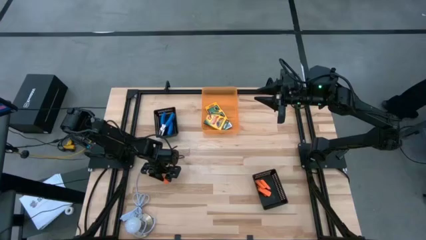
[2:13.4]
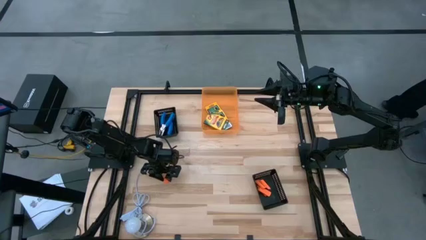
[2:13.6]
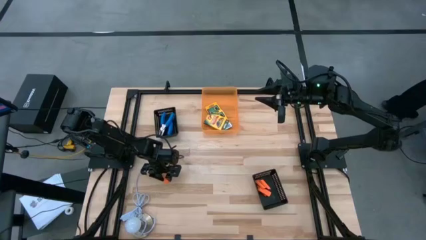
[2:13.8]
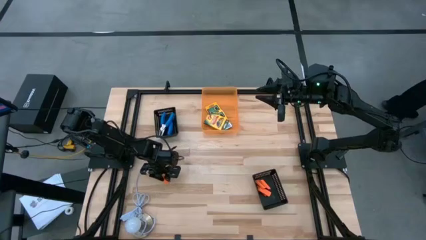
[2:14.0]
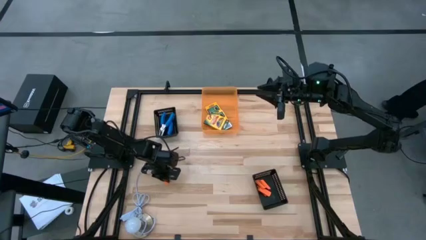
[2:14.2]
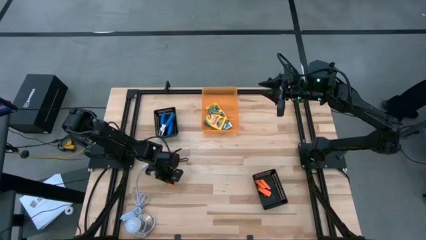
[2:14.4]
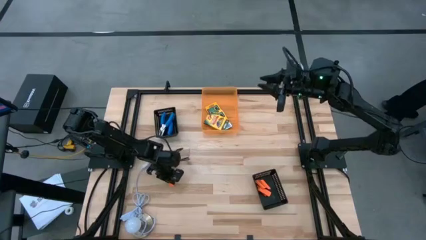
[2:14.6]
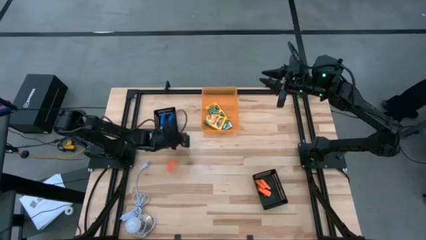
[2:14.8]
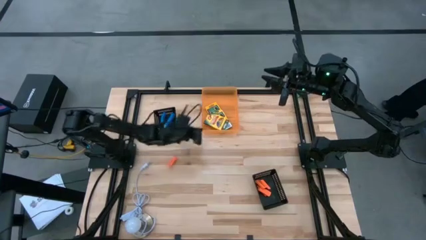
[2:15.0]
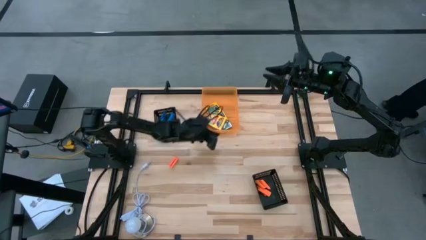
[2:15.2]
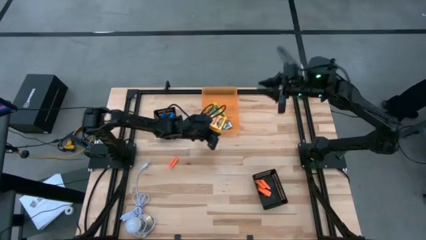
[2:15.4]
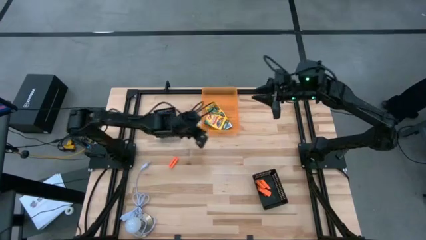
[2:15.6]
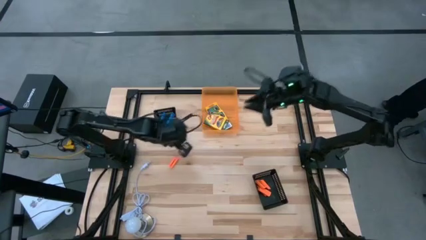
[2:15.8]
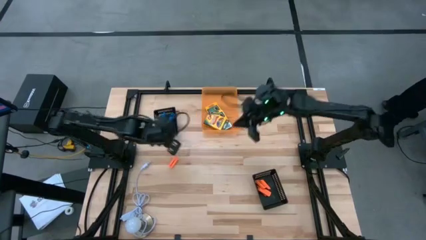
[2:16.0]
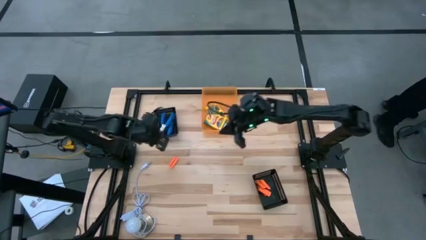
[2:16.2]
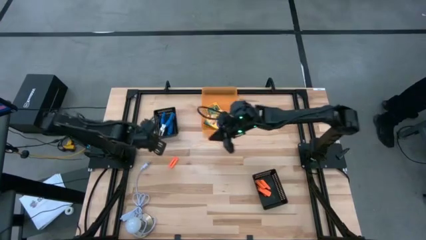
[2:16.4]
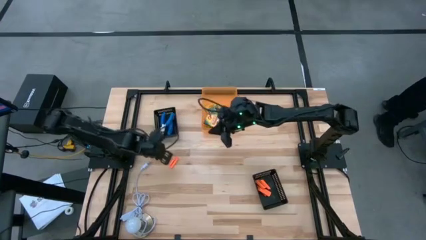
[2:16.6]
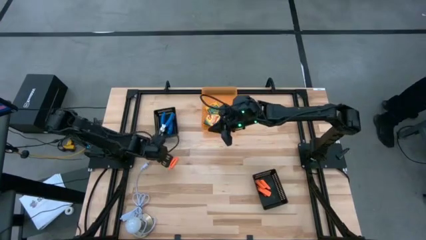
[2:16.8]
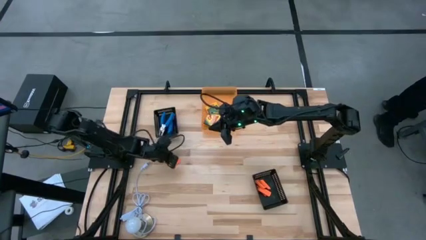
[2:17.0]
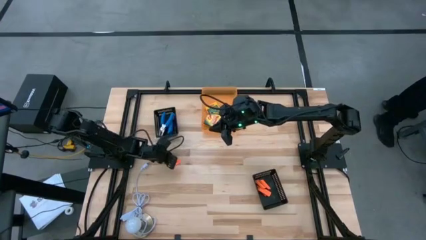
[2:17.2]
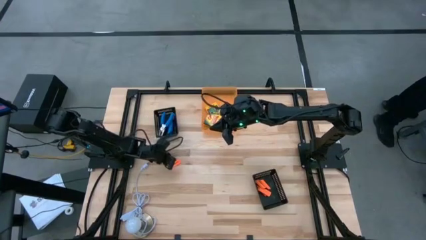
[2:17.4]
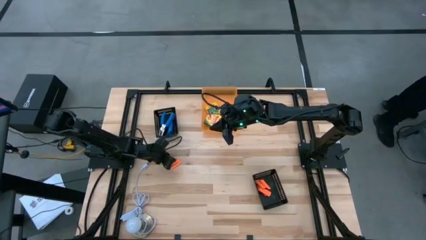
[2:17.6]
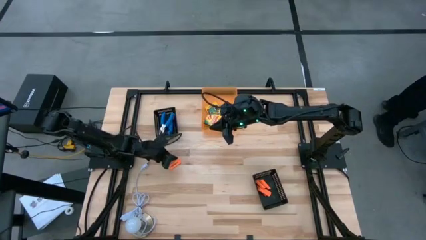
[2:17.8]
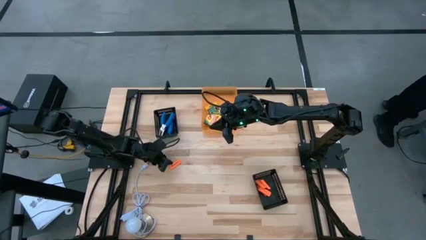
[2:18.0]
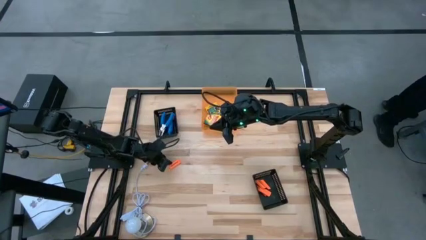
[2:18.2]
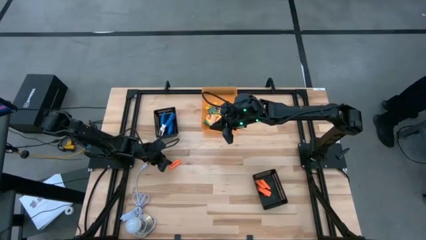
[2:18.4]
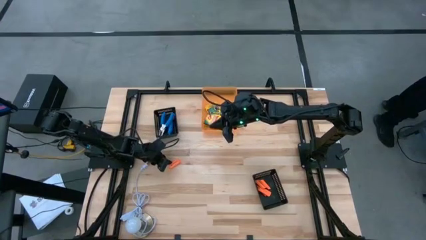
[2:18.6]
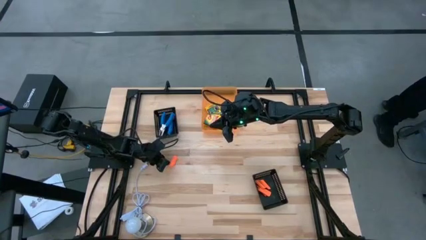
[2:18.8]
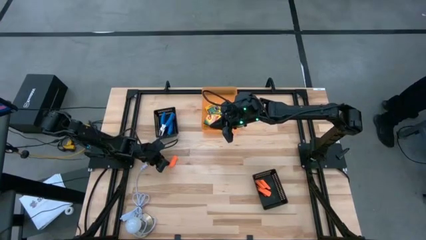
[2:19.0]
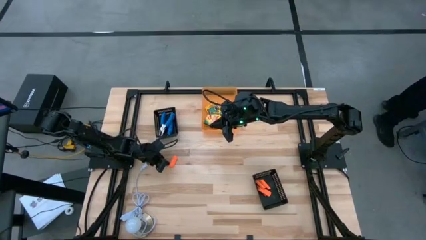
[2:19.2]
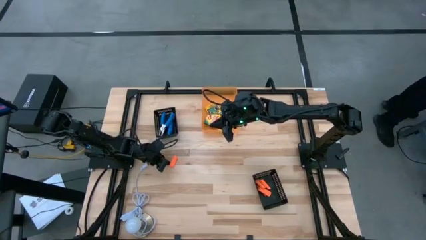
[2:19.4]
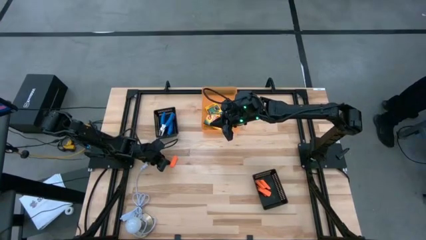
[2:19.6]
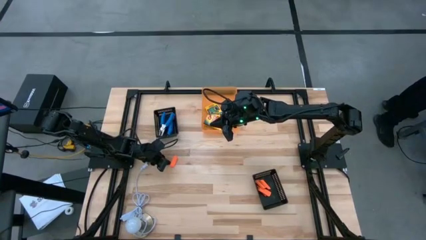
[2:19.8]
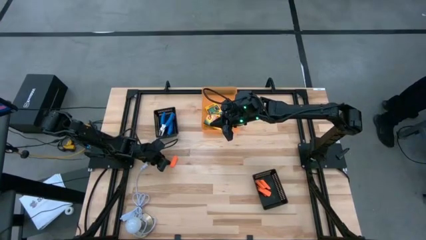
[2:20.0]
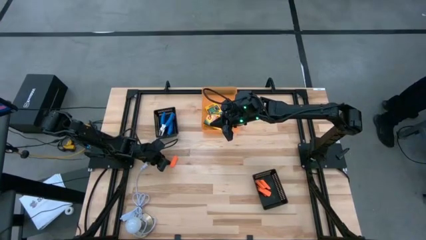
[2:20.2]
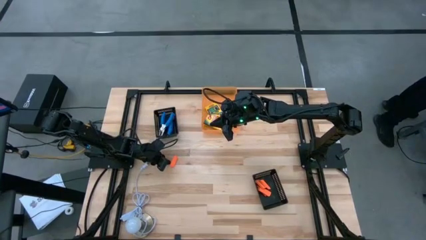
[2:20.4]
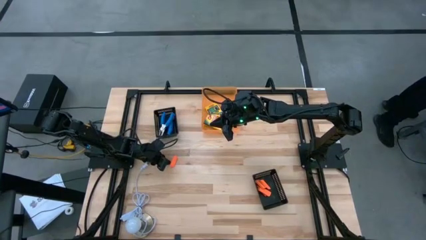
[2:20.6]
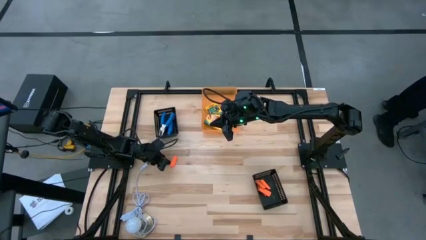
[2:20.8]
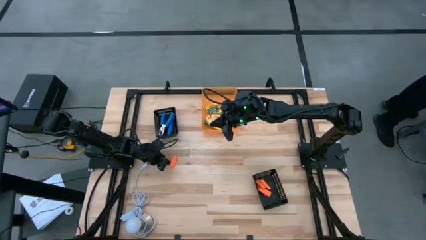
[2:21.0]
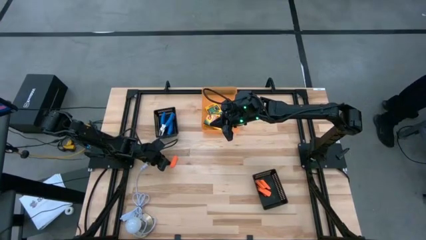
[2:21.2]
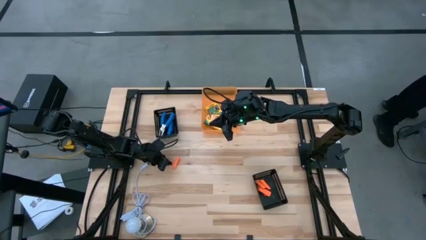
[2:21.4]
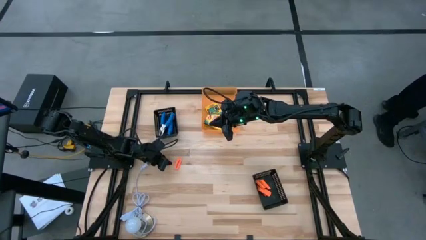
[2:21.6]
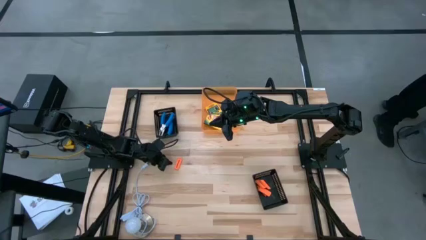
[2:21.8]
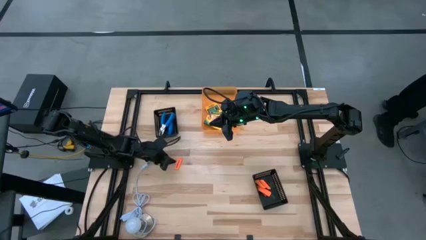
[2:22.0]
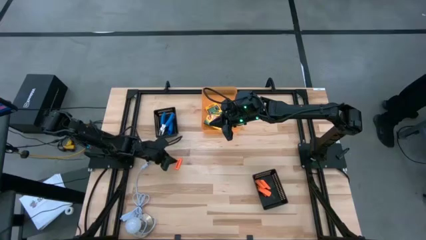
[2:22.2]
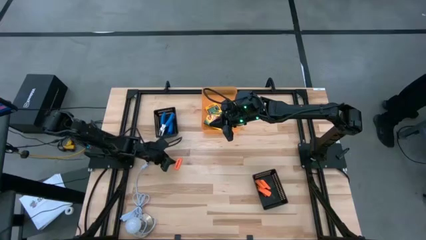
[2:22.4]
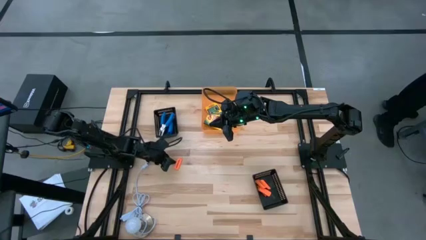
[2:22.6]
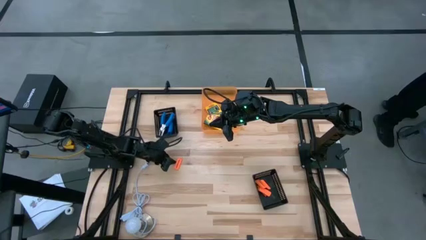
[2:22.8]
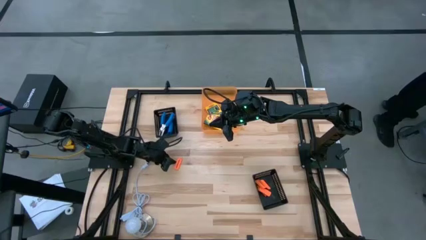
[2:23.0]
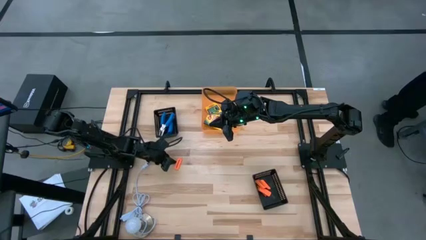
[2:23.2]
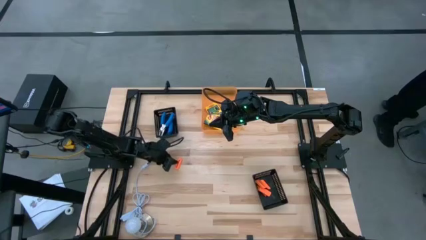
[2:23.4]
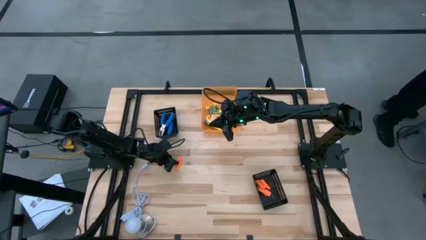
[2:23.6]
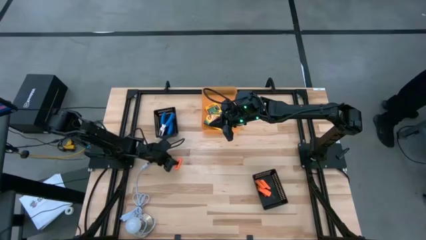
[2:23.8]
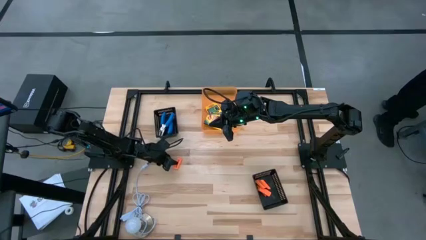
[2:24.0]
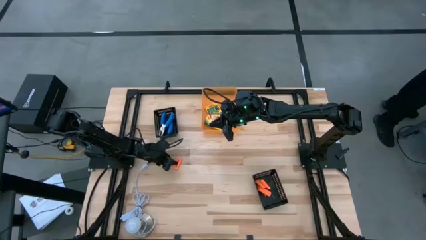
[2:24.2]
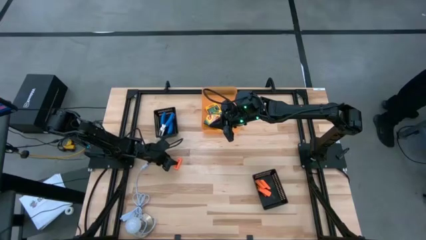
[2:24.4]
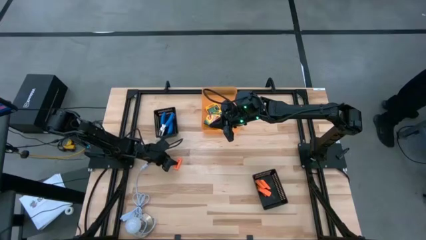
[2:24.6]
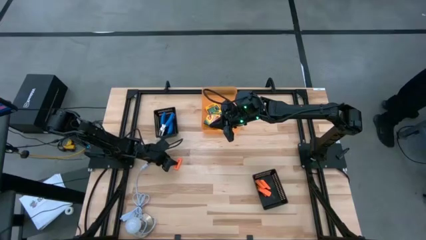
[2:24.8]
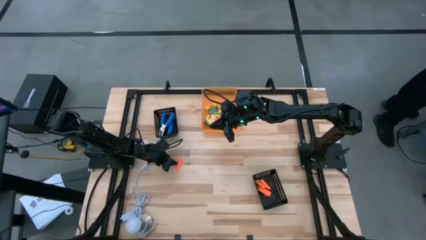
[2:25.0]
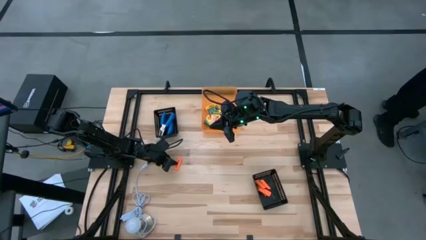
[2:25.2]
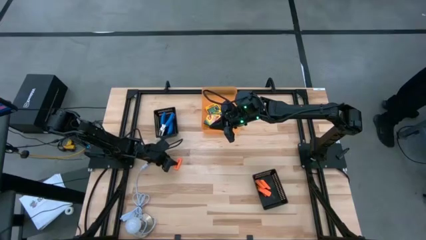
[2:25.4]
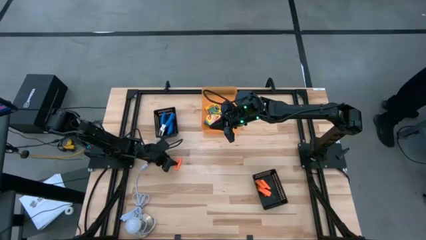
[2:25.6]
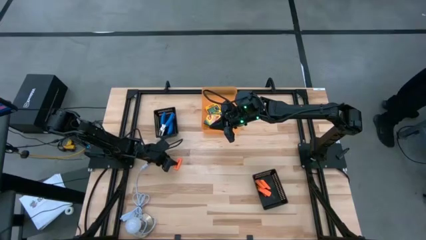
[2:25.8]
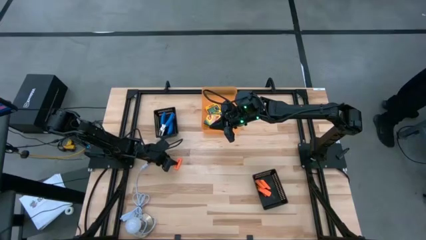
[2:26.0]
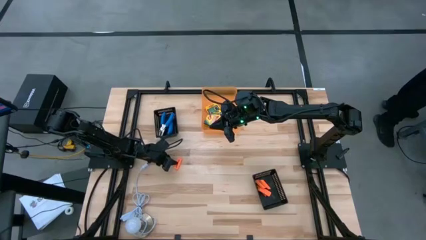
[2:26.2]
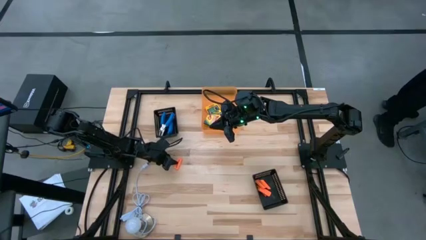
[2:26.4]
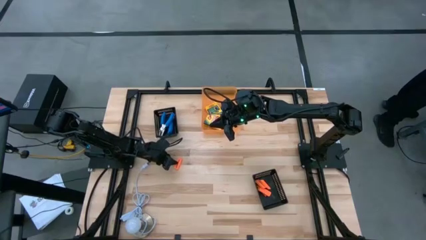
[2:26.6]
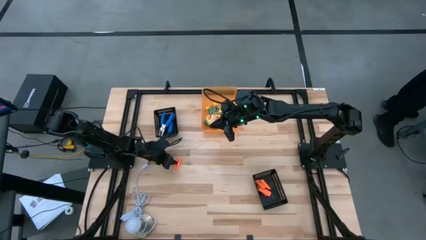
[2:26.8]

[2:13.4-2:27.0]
Task: Pick & Place School Supplies
Put the orange eraser into the bottom black bin

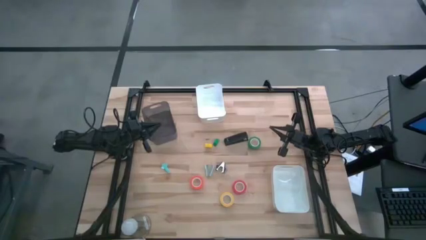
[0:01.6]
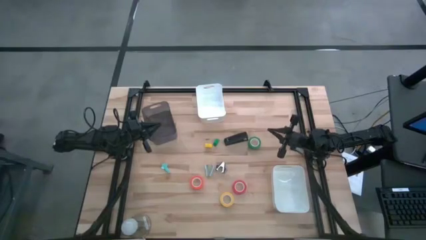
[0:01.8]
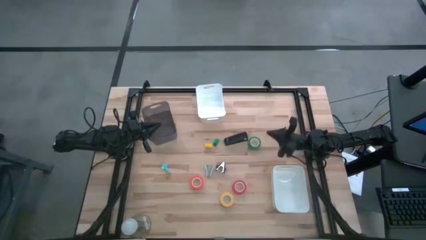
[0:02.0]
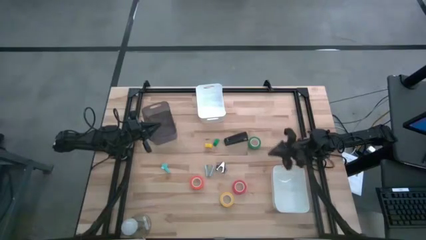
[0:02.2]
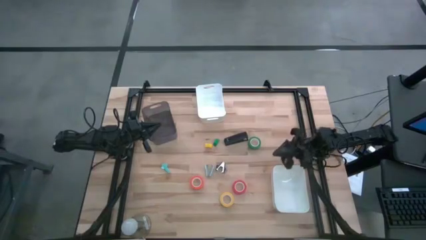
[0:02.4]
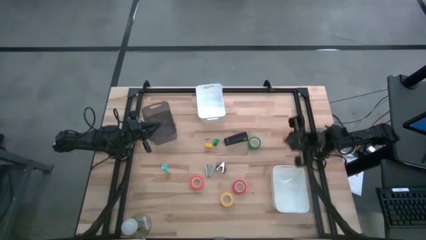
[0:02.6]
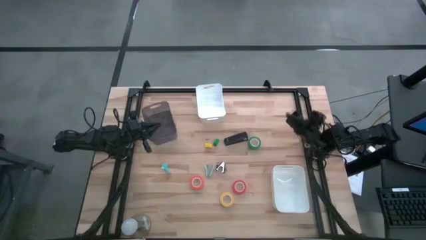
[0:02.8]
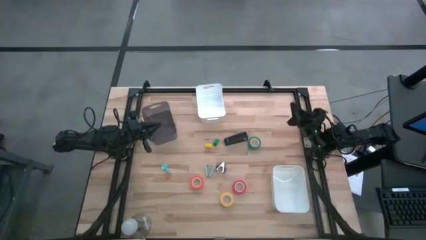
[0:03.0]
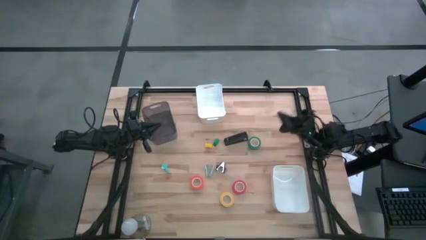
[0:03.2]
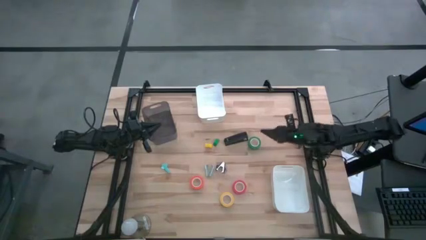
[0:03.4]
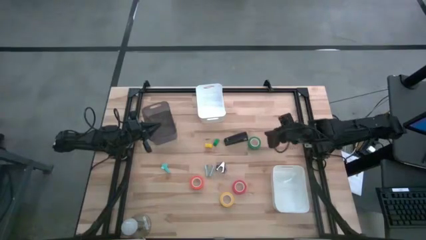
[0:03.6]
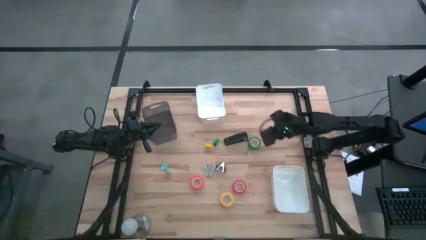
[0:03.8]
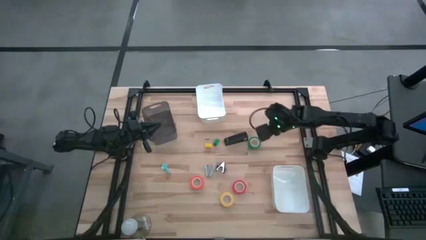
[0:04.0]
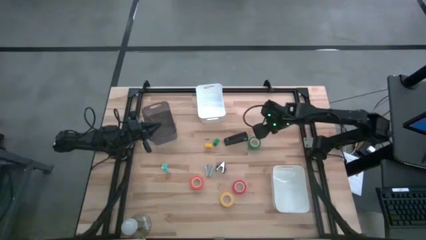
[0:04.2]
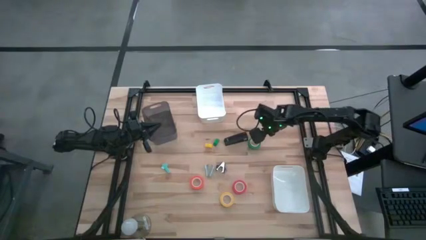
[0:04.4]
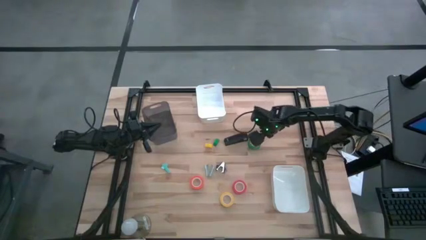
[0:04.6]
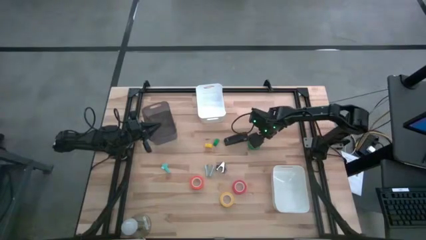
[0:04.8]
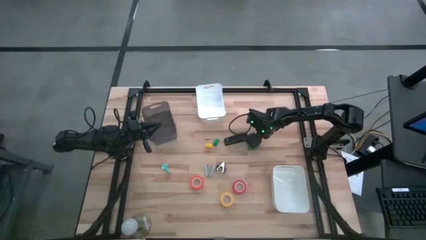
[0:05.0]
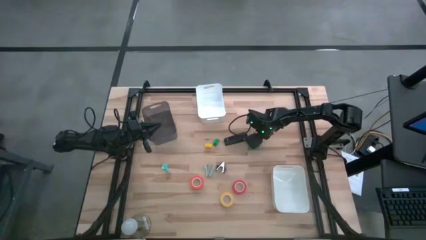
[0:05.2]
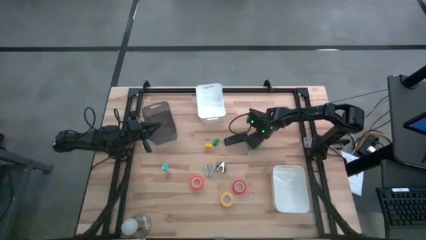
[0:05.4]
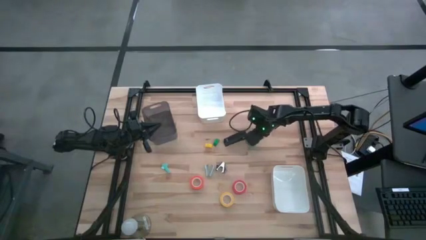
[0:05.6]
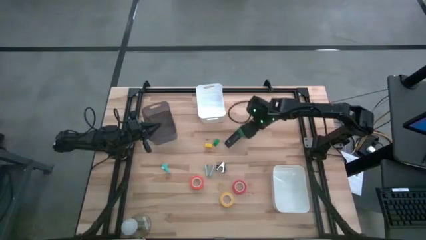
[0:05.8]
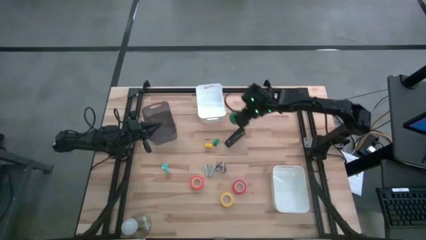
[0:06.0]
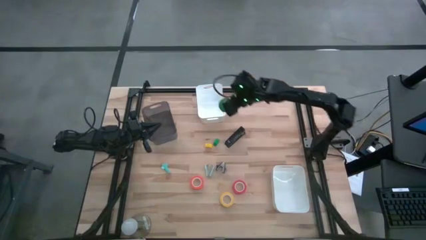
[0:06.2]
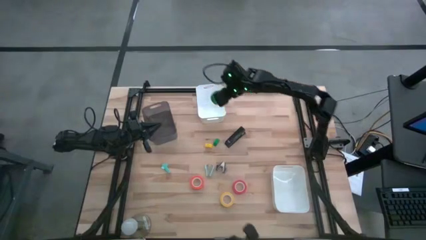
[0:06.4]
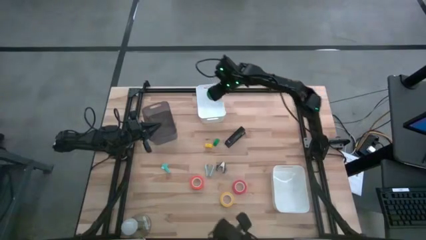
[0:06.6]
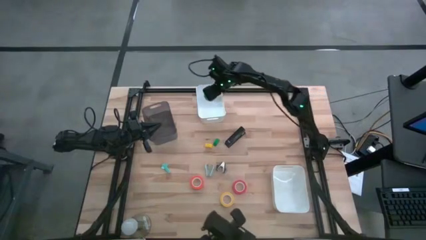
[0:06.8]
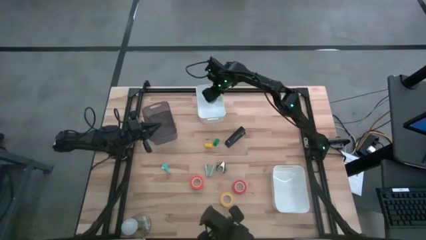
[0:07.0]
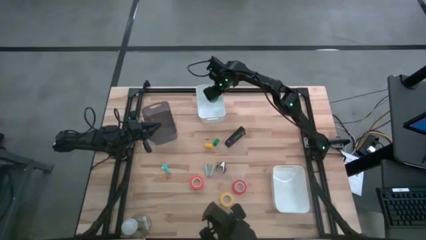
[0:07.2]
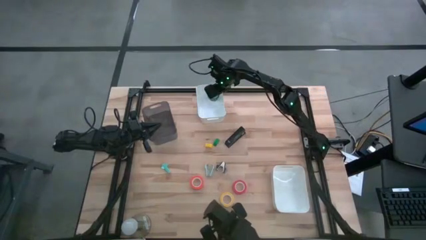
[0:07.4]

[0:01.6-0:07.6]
Task: Pick and place Stapler, Stapler remover, tape
Put the green tape into the top white bin
